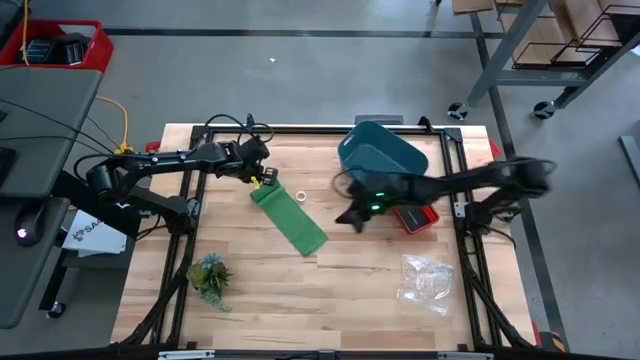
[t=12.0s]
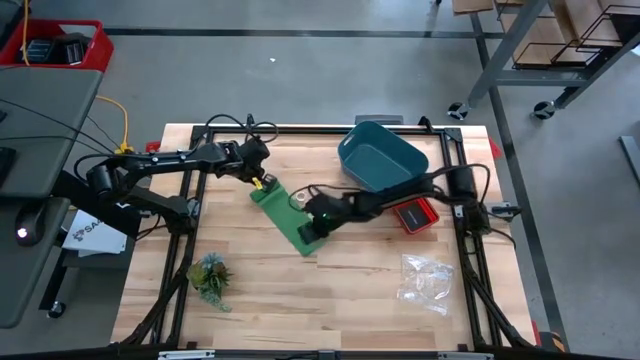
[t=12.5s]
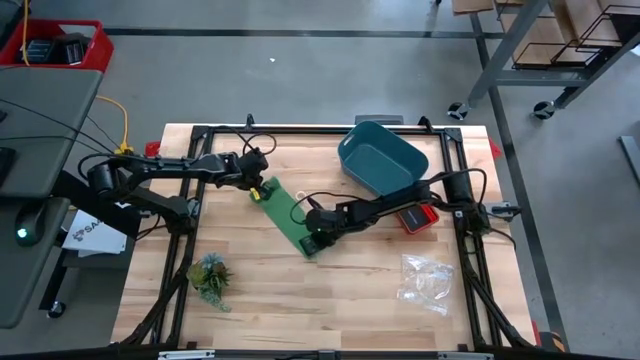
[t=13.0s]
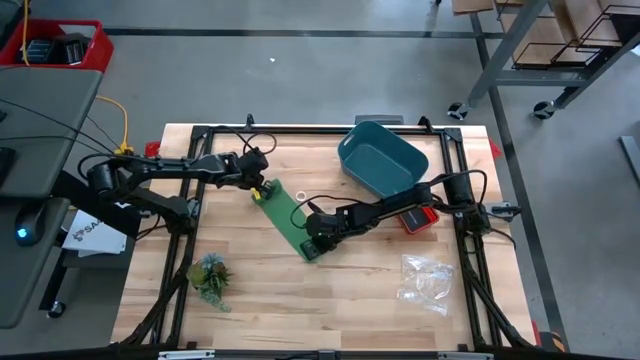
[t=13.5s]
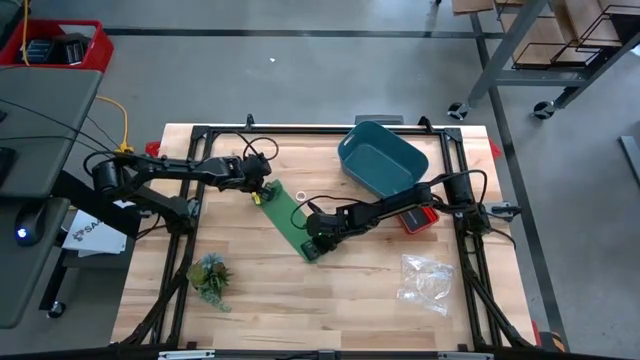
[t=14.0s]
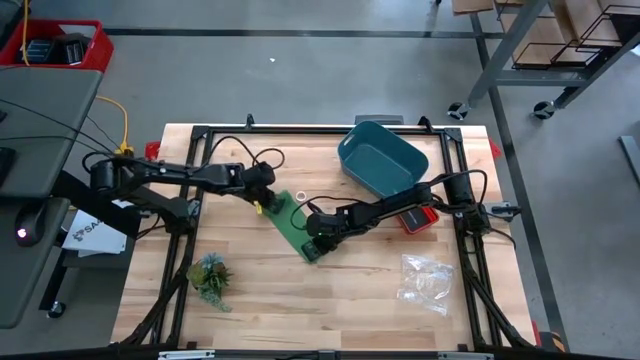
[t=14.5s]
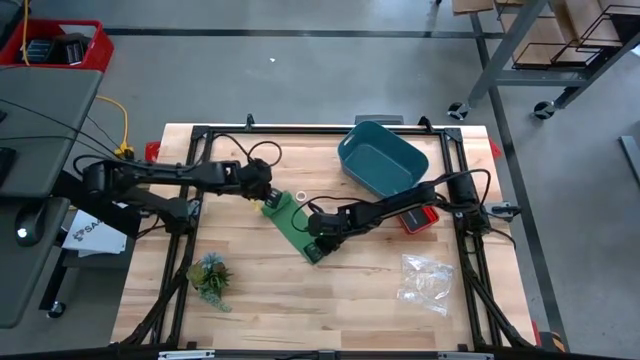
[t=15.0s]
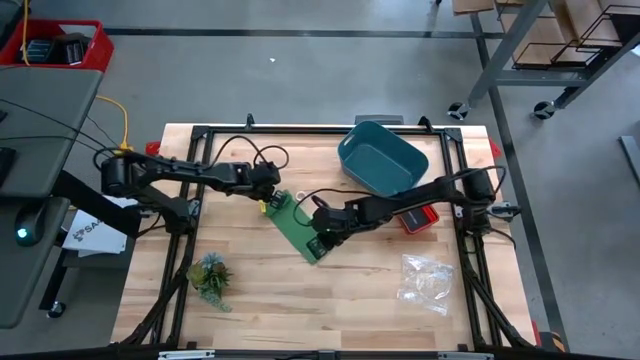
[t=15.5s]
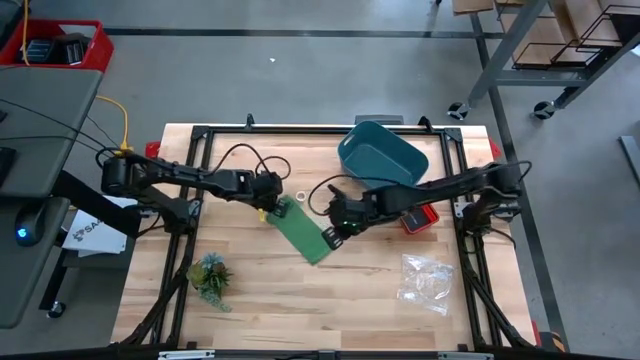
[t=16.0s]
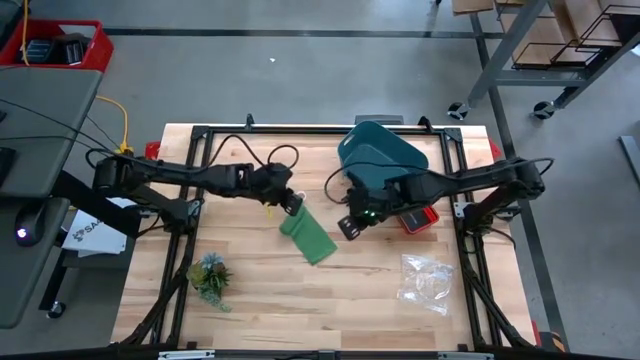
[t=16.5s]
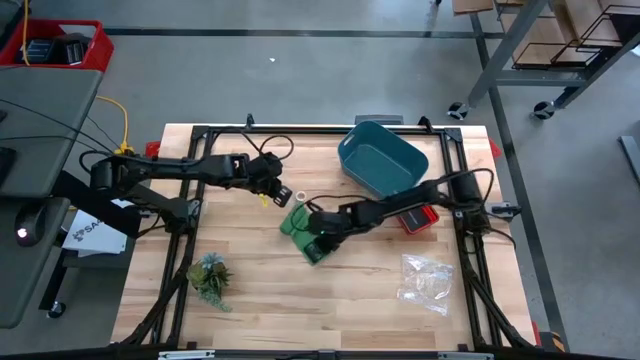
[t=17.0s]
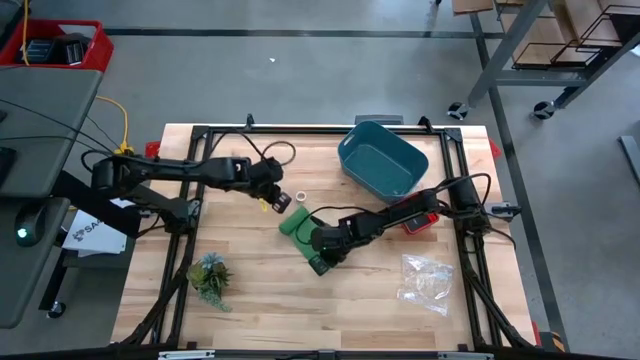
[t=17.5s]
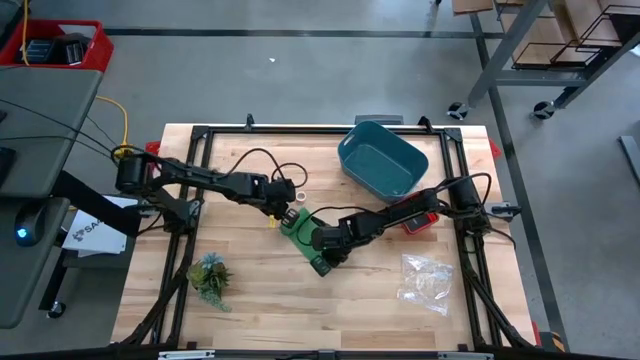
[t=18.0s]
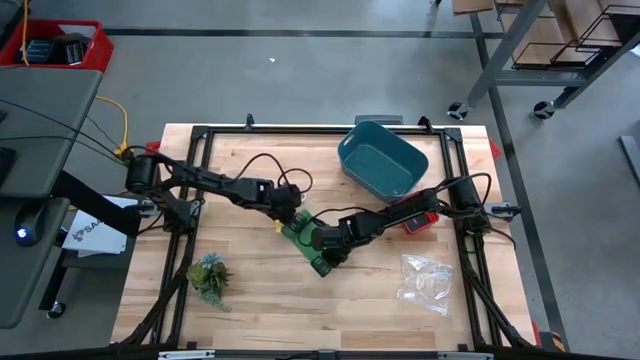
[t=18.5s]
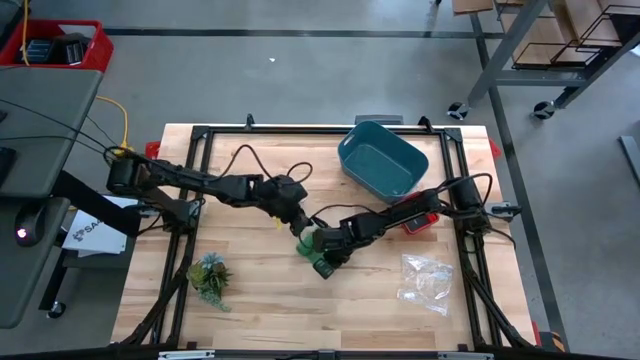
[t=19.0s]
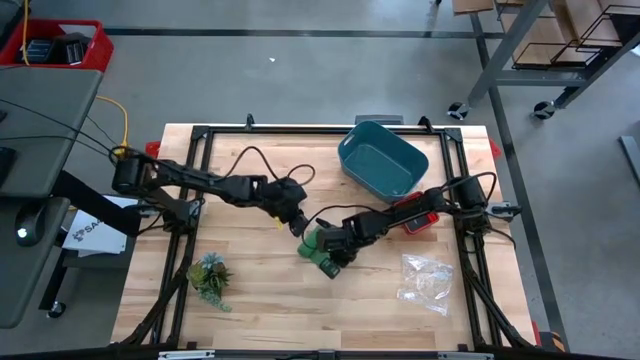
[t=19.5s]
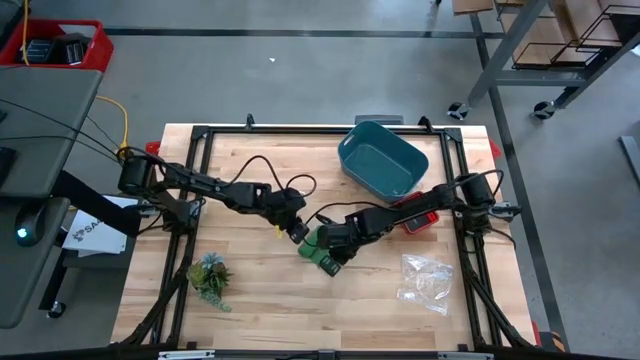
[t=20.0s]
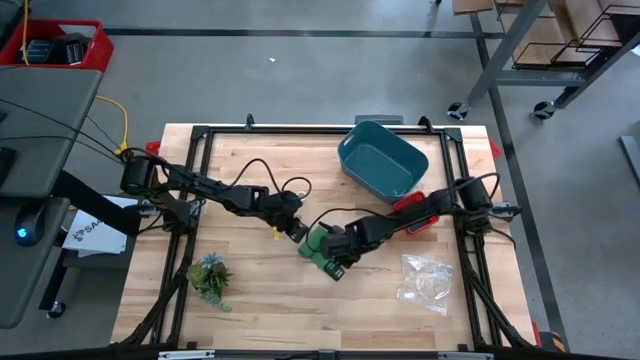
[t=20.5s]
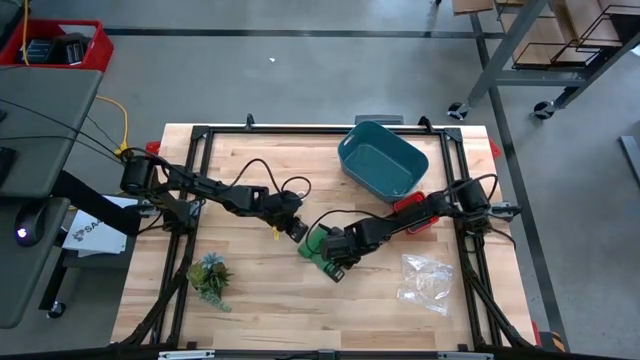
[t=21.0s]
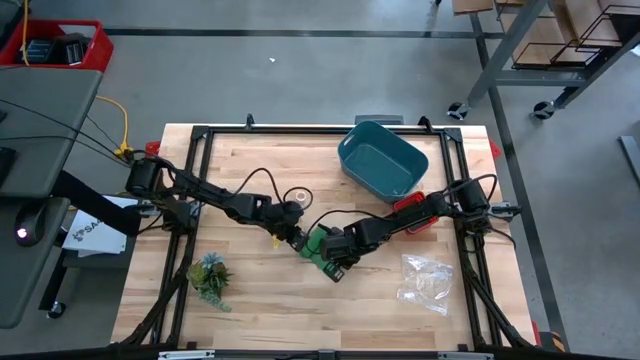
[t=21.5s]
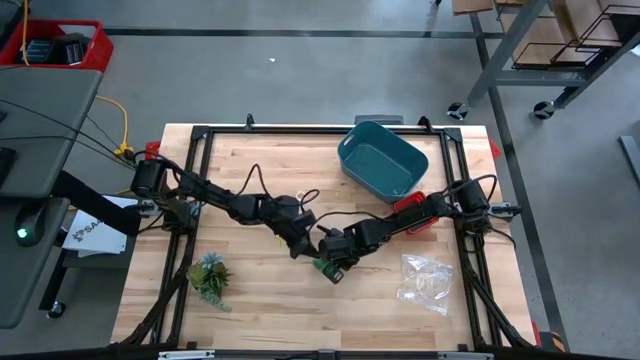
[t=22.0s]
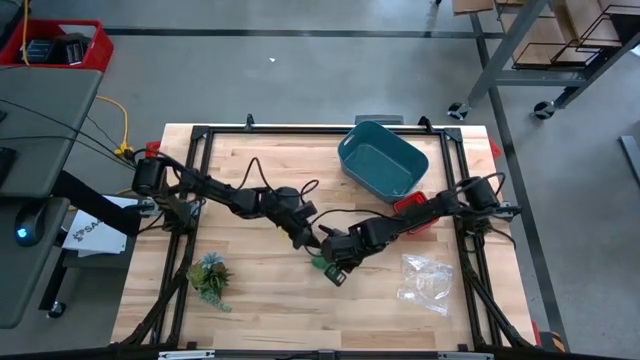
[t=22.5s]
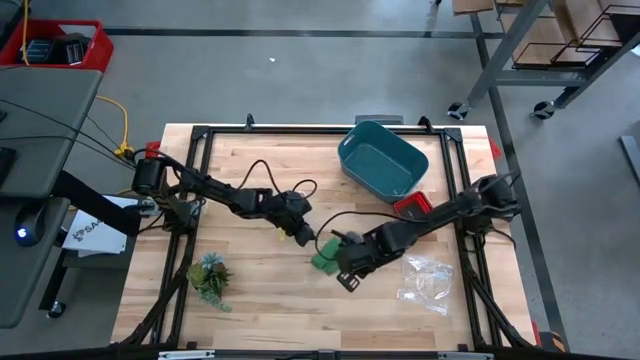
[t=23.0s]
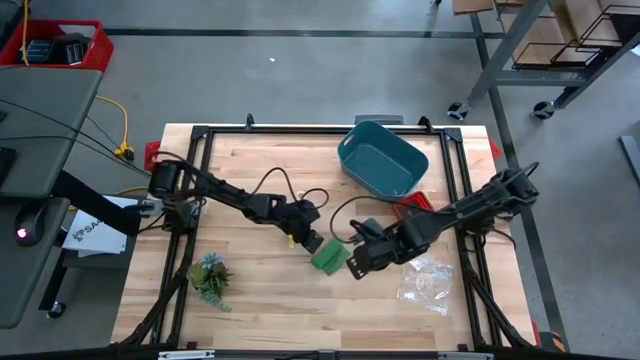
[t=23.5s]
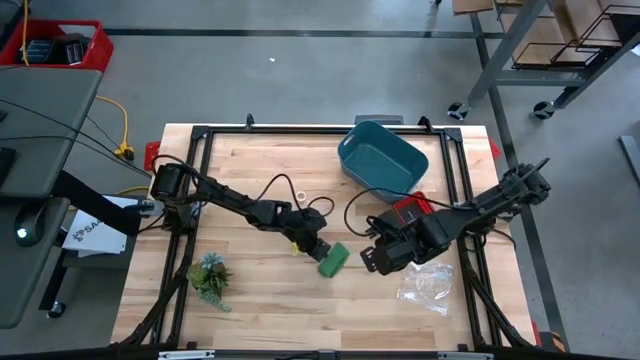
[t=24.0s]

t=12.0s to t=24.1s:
Task: Roll bandage
Roll the green bandage
